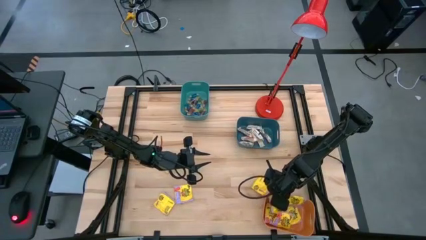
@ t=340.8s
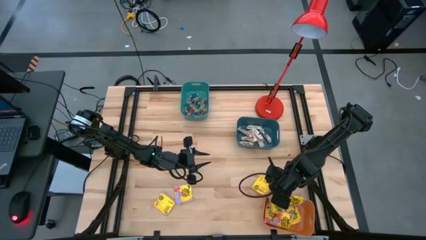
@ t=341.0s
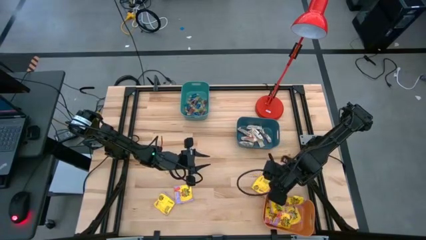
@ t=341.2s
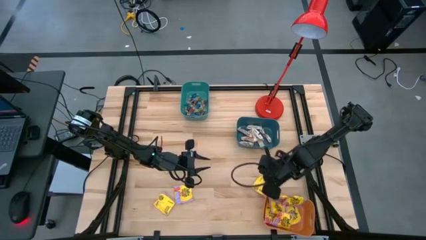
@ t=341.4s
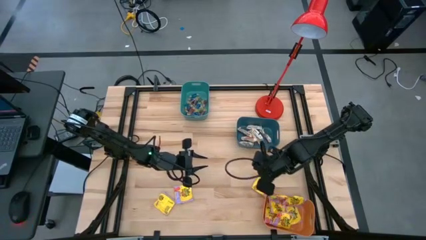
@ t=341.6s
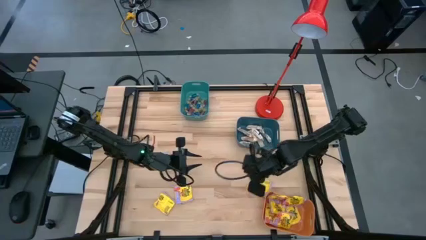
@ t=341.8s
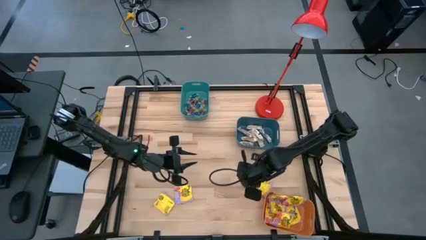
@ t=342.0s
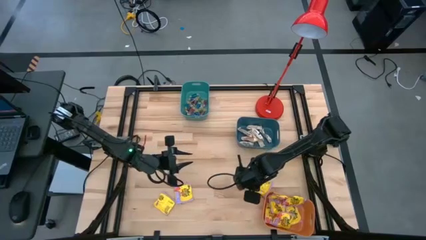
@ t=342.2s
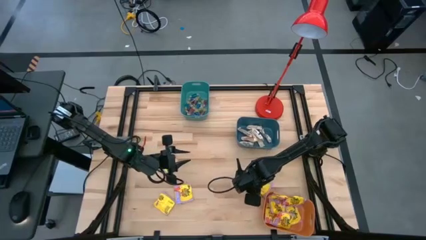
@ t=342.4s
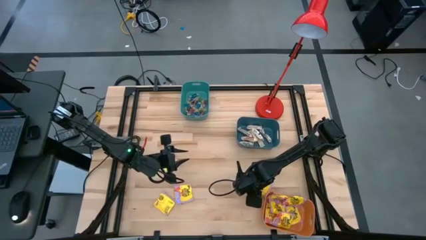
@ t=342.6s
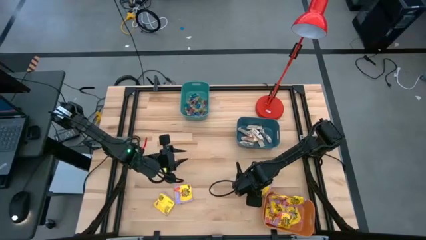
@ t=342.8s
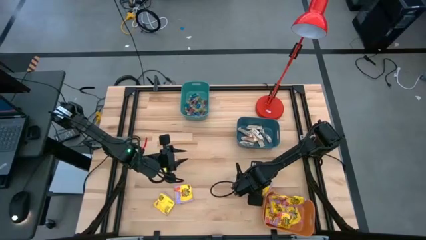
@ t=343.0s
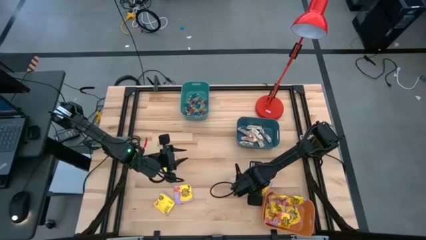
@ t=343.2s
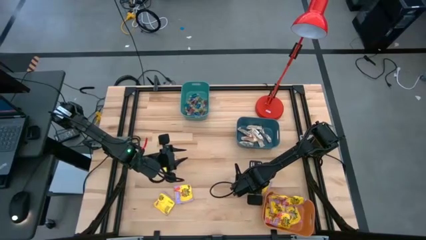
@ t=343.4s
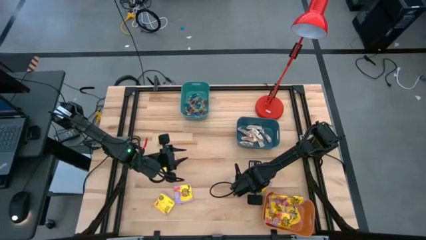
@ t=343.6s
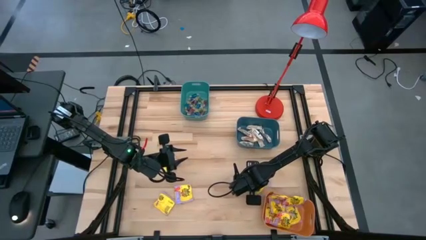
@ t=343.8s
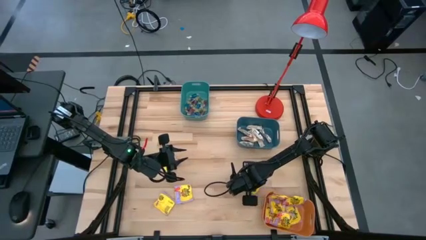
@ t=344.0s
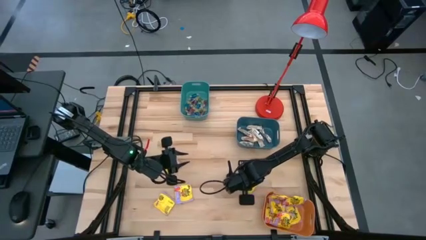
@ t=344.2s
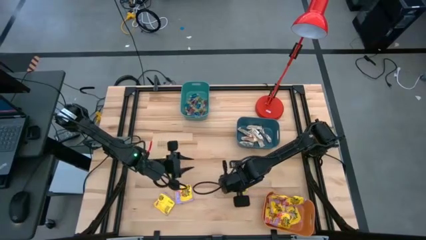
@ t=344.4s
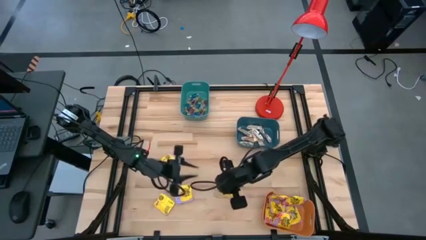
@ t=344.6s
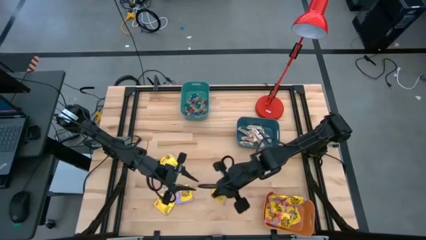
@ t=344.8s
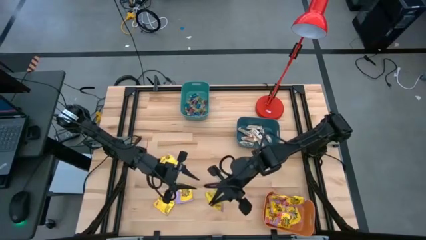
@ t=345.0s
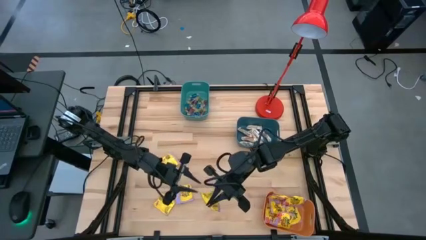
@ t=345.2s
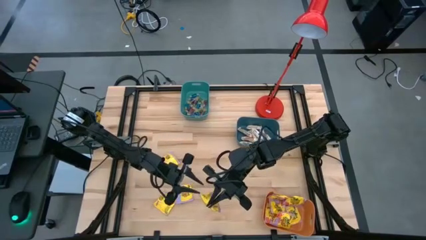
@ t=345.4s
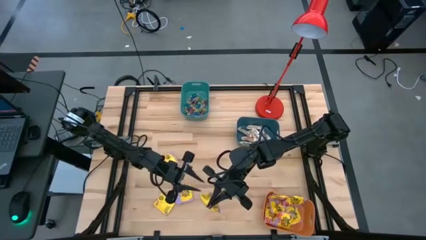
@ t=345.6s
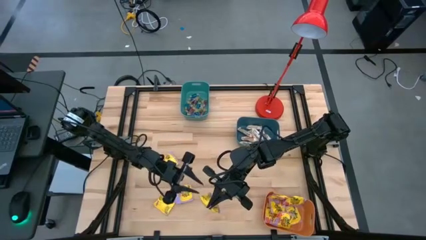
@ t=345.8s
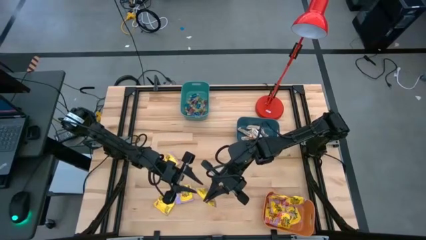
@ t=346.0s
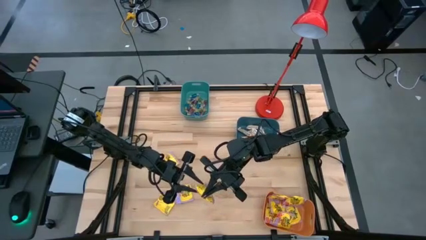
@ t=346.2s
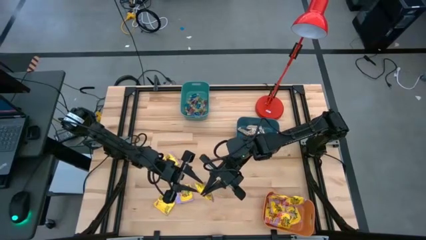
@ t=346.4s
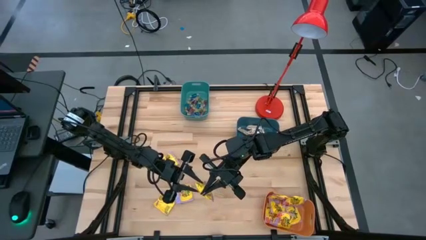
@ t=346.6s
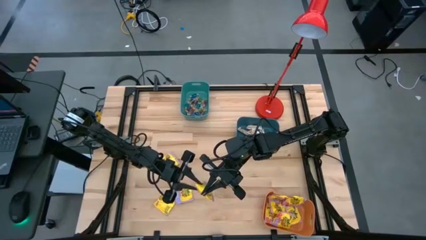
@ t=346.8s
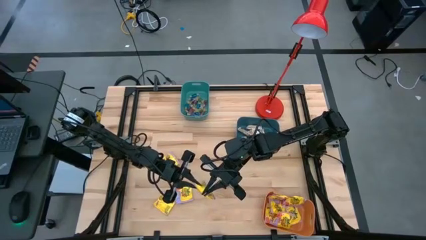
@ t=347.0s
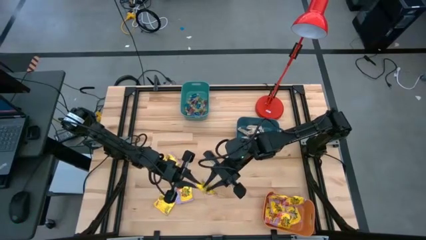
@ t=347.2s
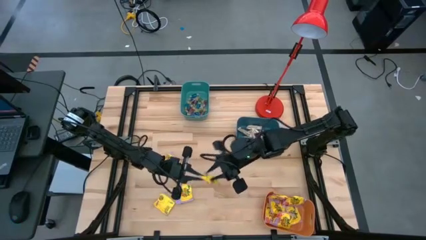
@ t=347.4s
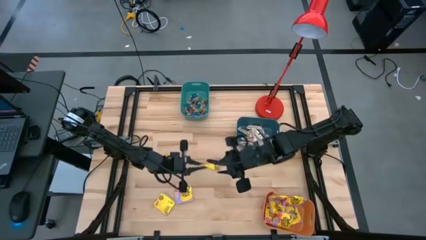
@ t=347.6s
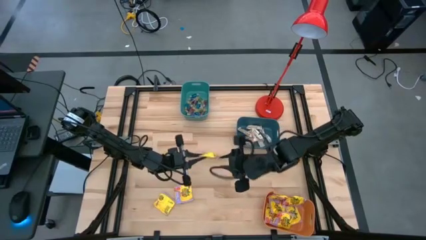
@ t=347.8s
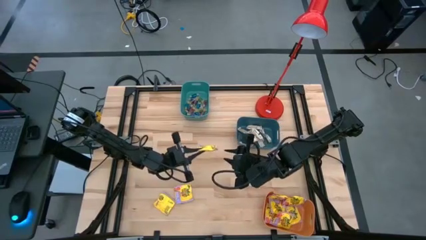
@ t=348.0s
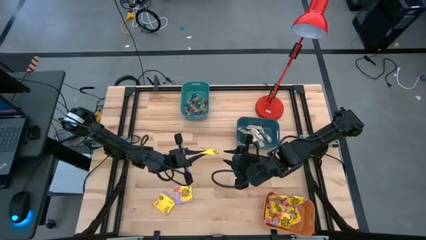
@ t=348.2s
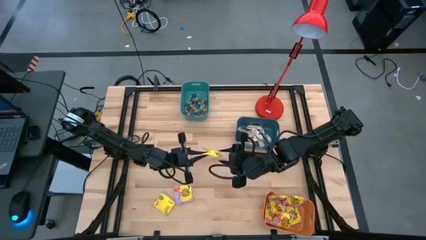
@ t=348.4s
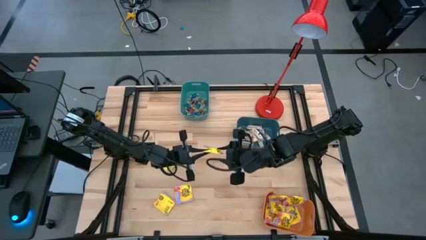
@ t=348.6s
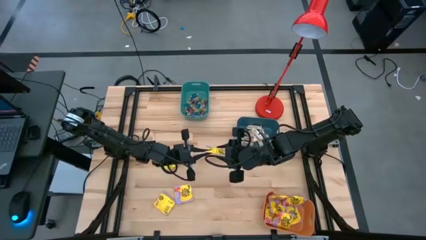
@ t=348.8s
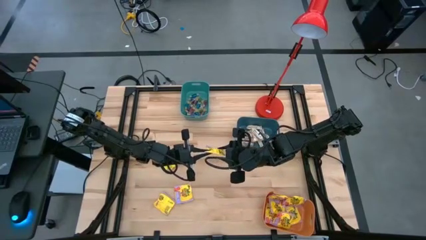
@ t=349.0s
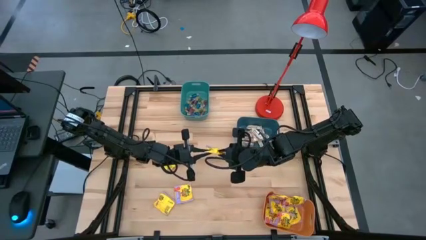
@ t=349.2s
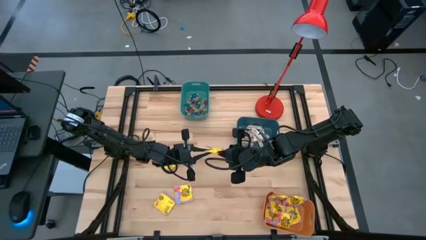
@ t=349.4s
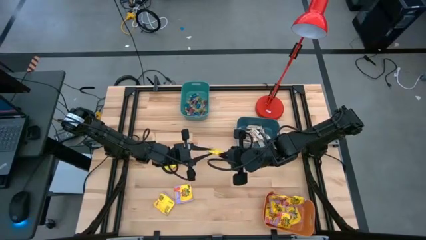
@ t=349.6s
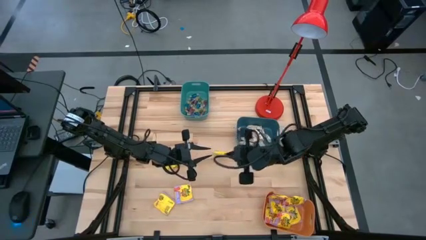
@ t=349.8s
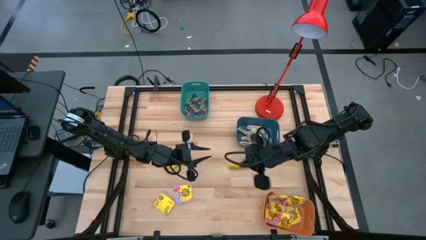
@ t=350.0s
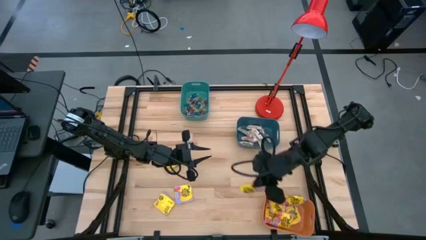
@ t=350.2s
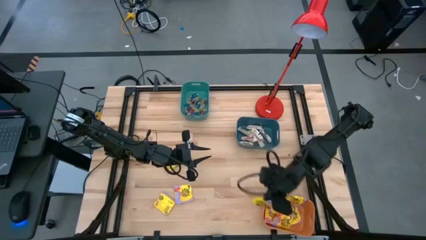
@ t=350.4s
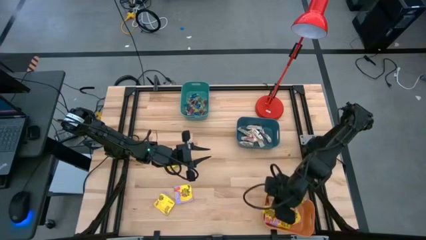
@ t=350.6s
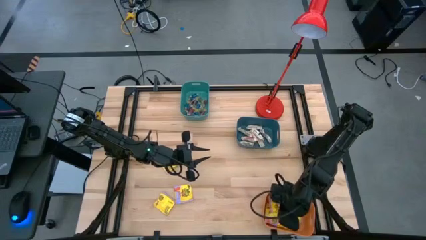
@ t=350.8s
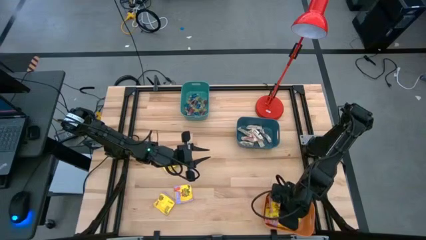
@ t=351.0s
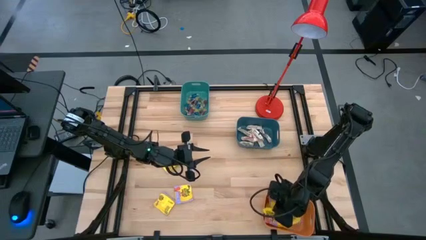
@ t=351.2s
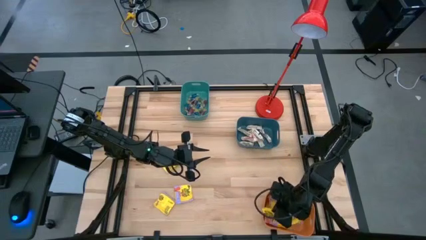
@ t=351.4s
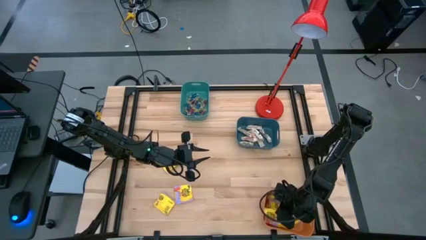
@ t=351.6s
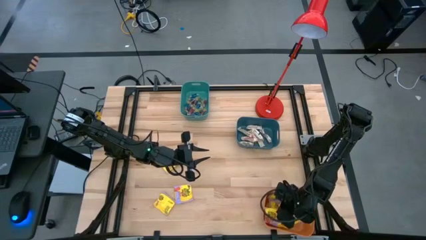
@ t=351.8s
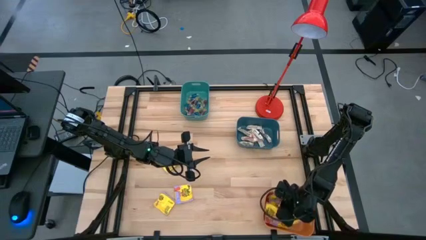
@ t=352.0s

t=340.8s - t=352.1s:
Task: Sort candy
Put the yellow candy bag into the orange bin
